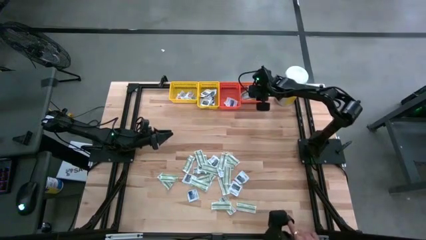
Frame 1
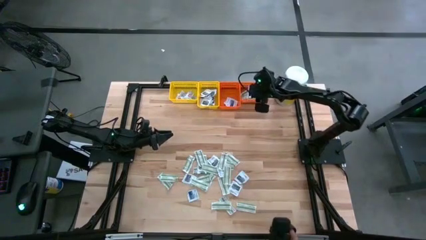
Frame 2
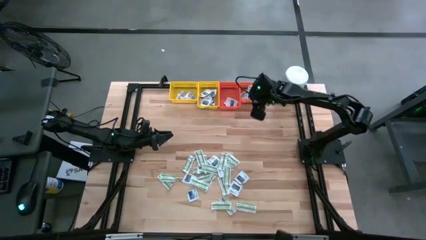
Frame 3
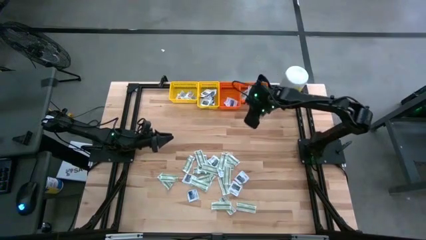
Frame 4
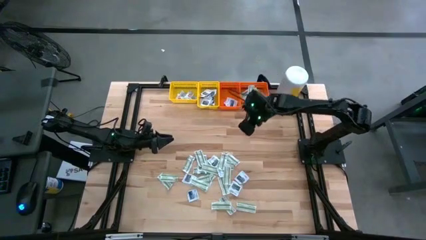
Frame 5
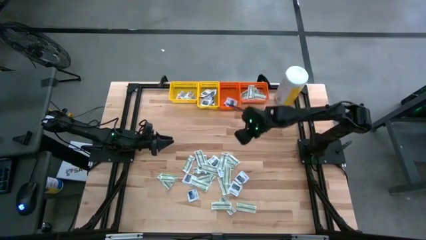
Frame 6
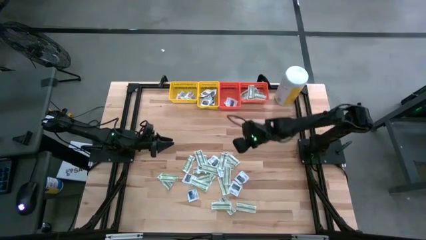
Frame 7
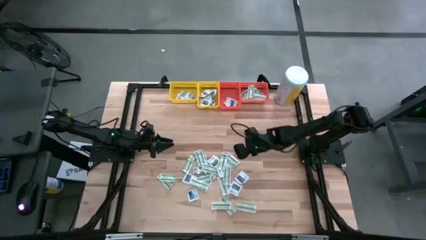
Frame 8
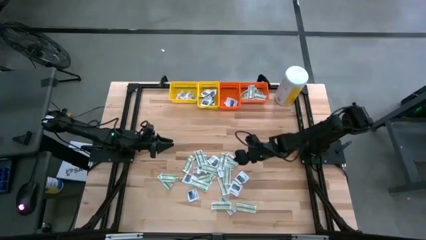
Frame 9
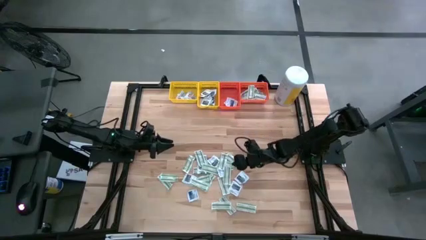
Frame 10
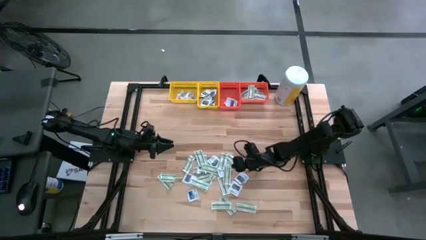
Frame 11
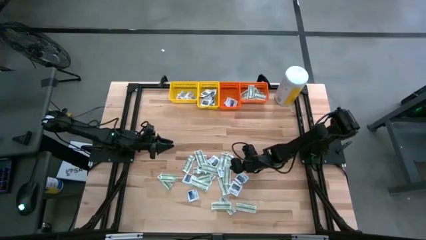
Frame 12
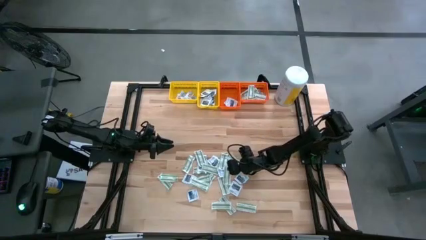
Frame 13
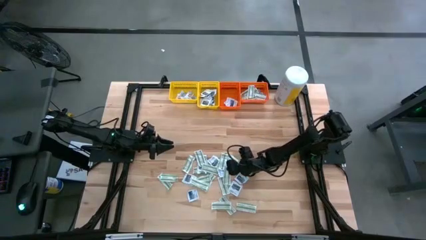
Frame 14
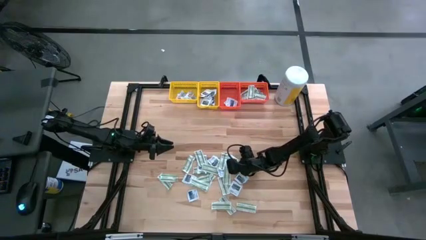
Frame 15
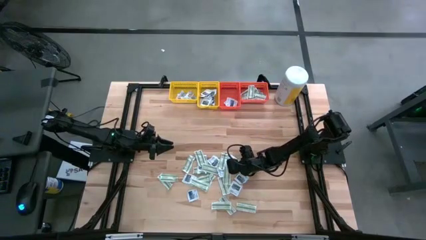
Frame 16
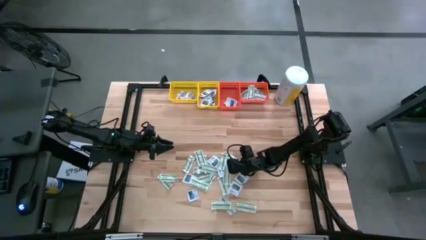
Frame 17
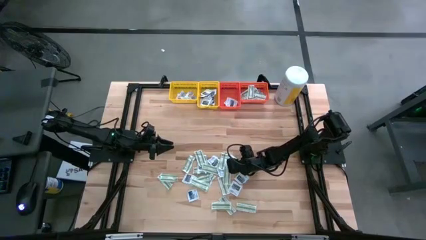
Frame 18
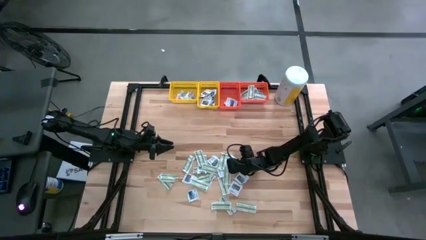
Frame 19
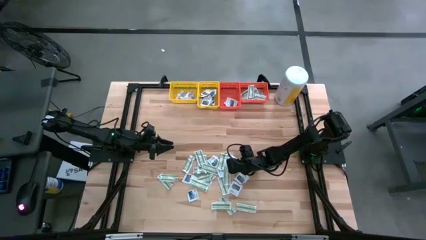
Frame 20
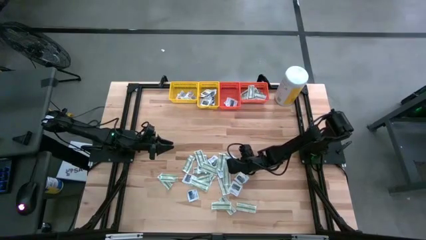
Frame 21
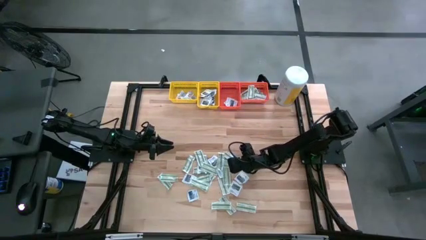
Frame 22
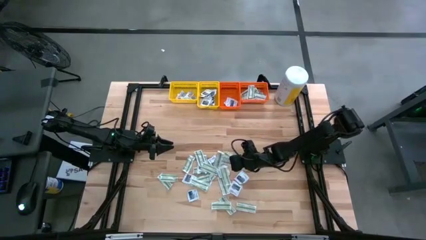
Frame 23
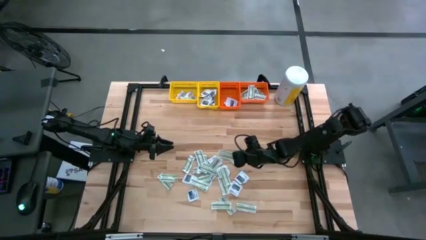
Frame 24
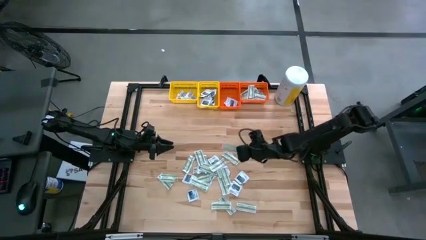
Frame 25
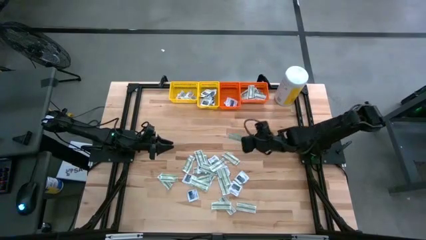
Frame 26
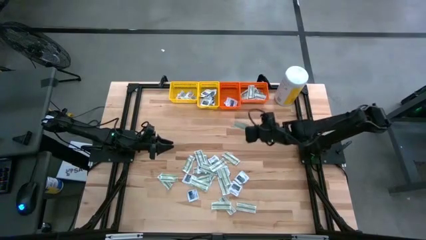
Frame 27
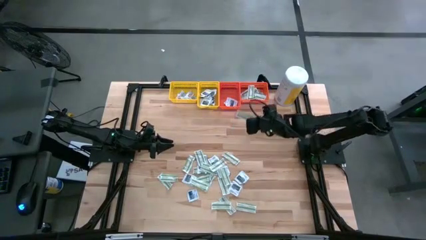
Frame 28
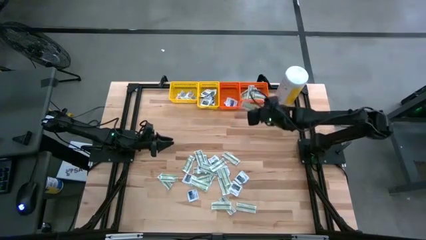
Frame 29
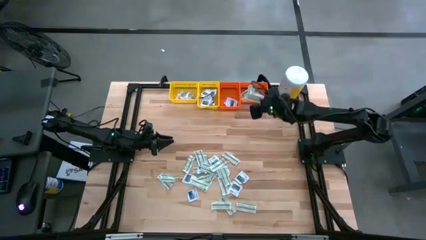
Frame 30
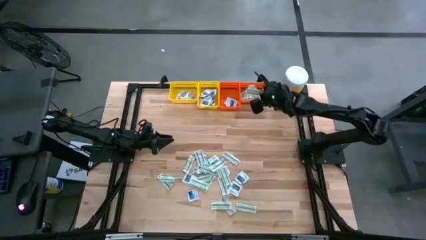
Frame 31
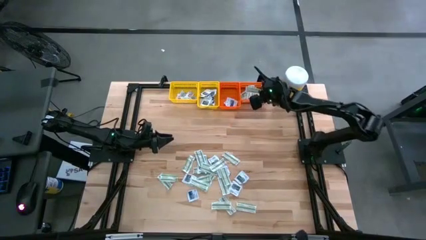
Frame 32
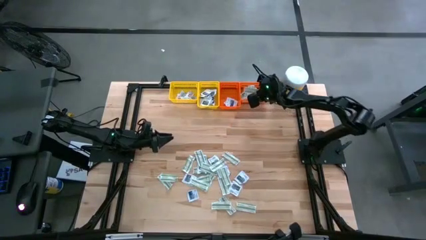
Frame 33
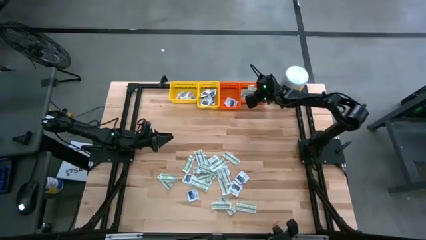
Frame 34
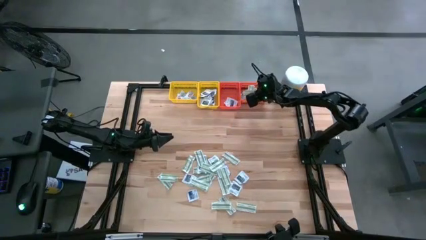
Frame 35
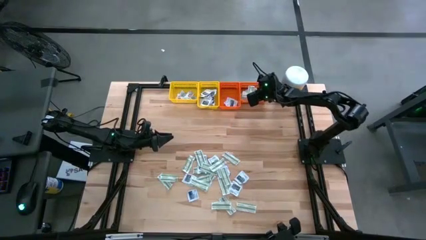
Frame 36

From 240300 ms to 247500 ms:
Task: Pick & Place First Aid Supplies
Put the green pad into the right orange bin

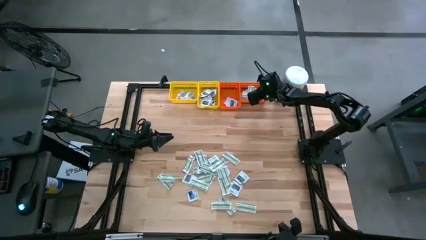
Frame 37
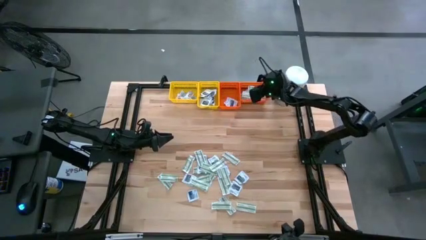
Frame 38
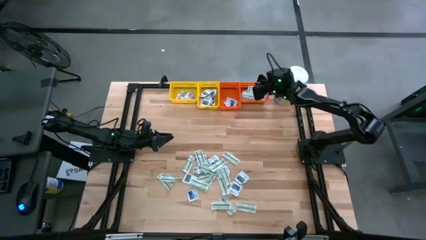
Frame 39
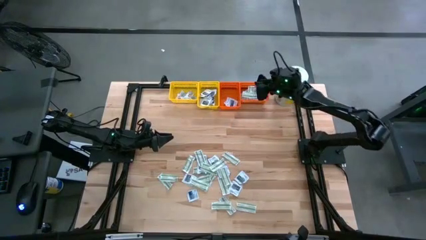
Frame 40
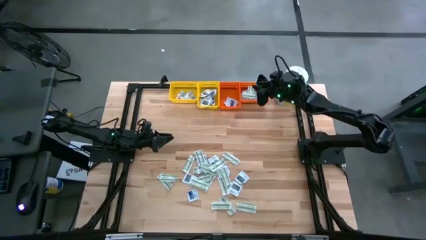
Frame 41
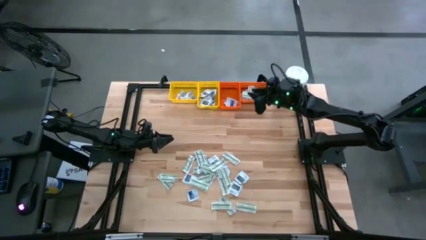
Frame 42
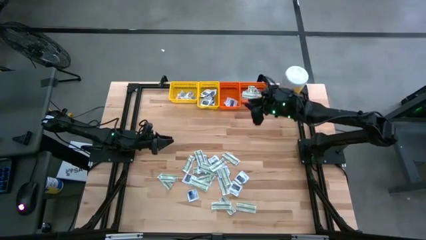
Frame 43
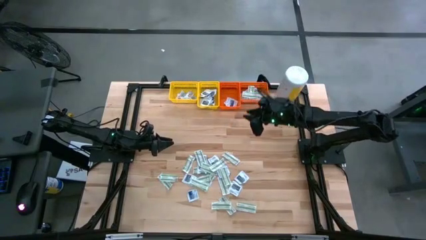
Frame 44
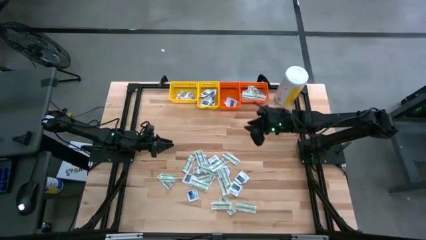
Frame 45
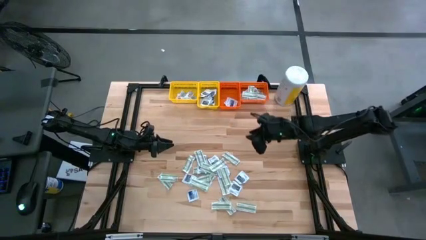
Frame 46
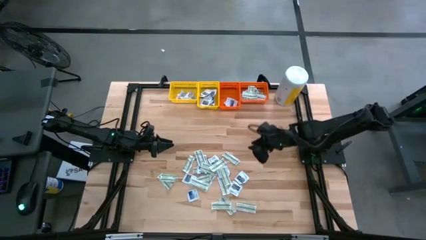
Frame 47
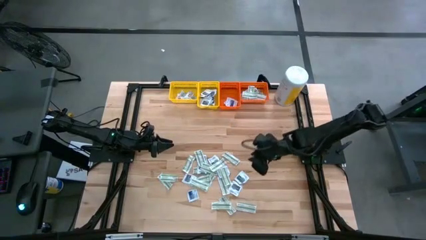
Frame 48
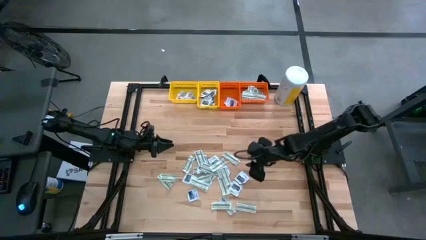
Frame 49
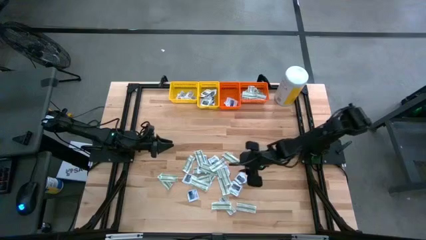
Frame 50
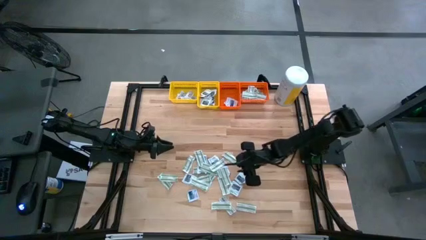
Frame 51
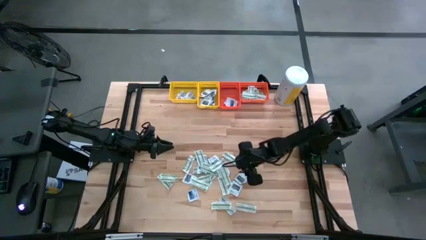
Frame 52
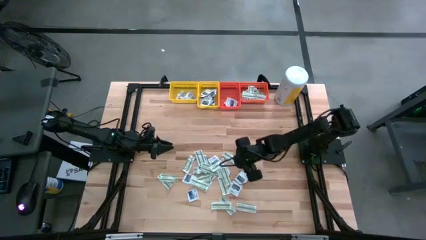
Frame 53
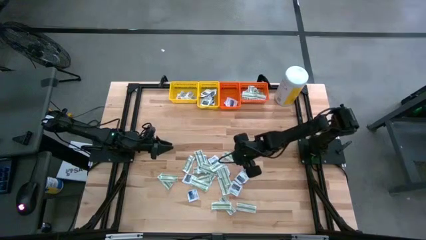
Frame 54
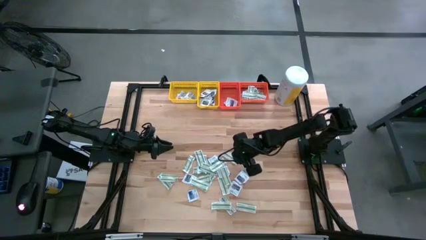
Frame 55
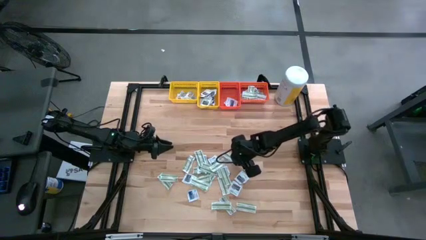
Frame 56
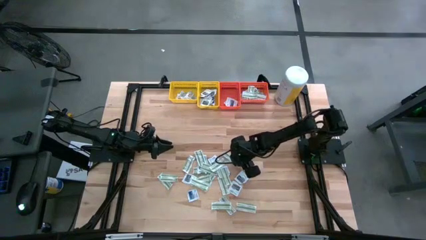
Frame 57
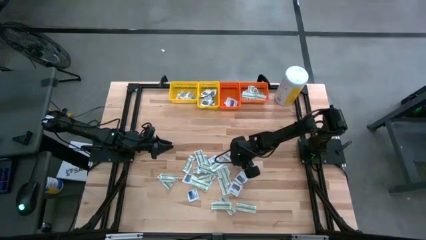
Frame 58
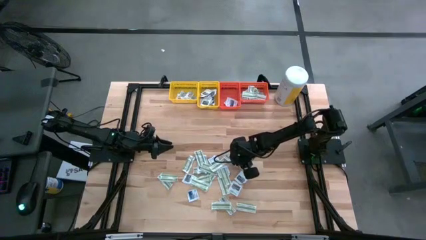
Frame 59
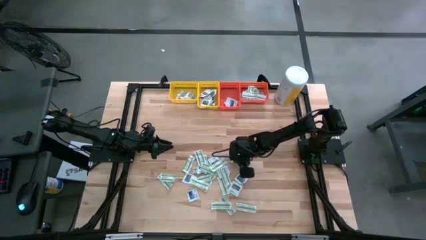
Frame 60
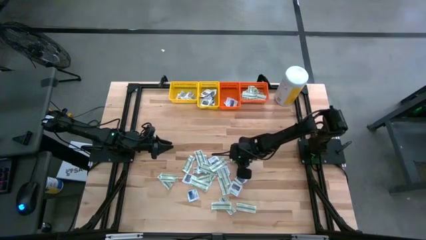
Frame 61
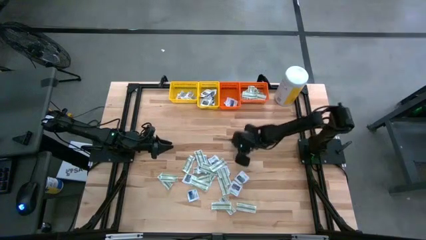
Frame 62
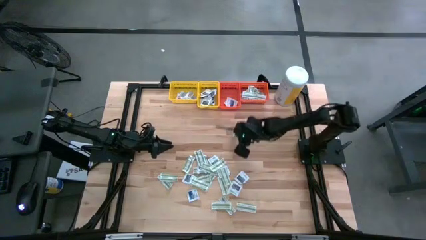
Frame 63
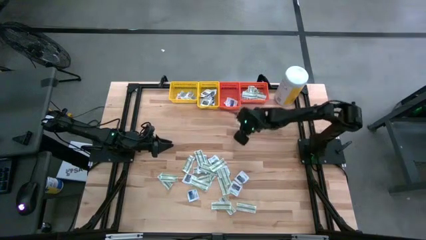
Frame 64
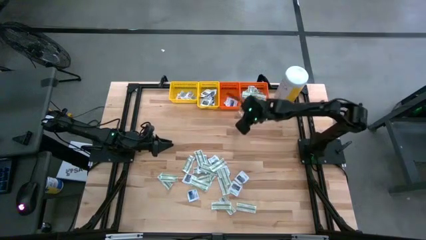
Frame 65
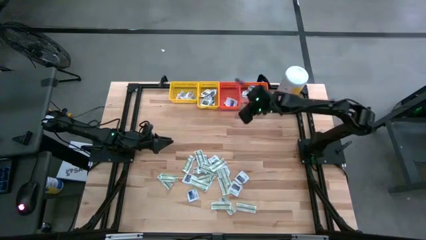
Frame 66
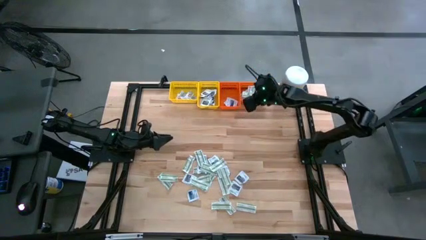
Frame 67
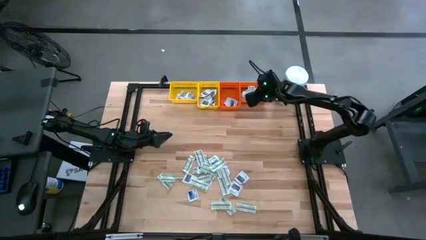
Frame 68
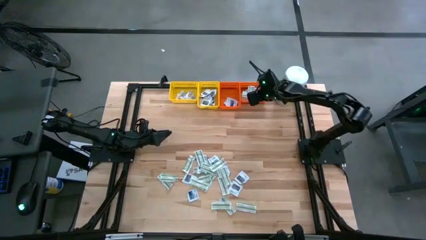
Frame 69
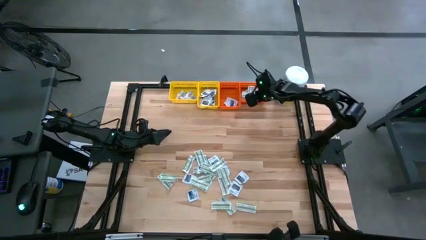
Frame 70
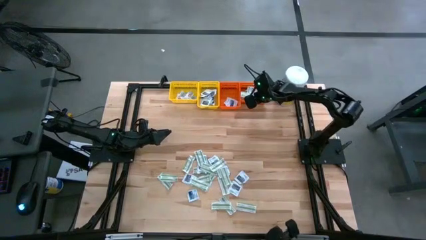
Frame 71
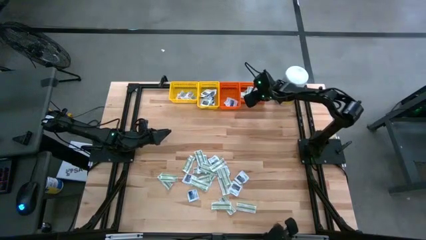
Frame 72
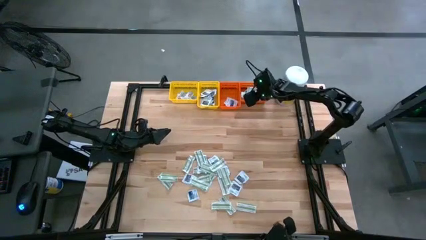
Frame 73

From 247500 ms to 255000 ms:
Put the green pad into the right orange bin
